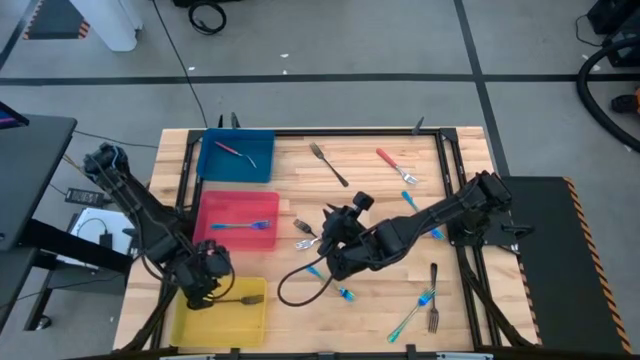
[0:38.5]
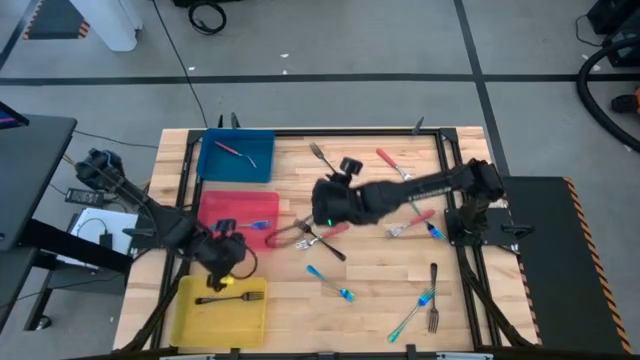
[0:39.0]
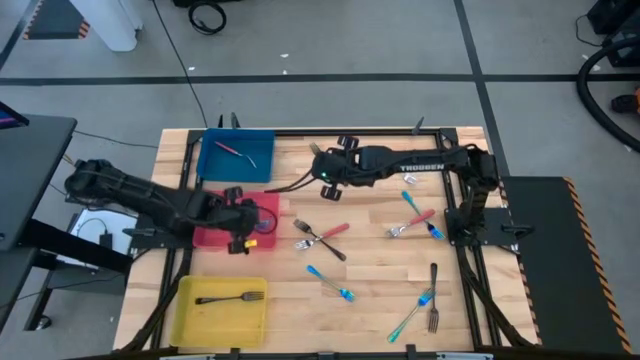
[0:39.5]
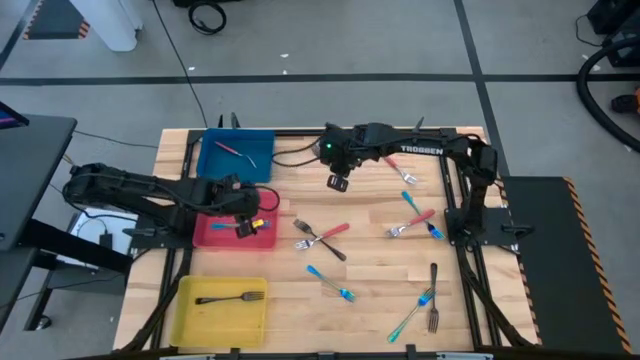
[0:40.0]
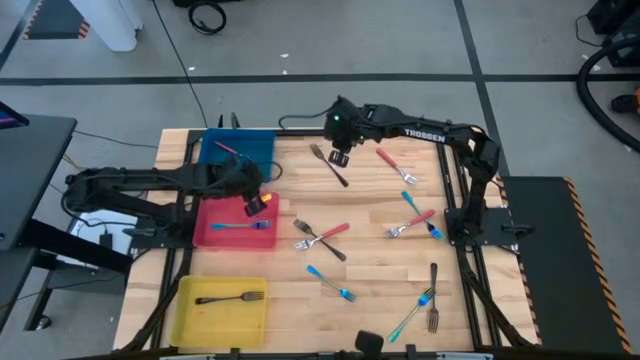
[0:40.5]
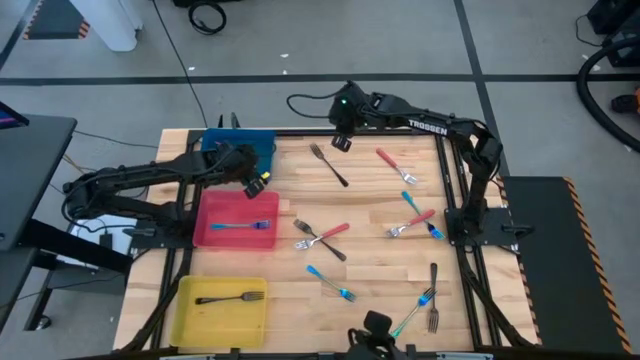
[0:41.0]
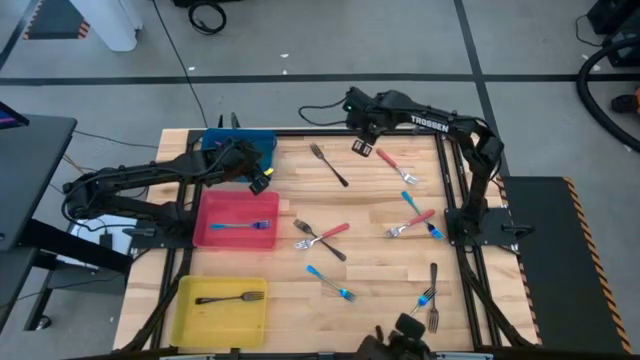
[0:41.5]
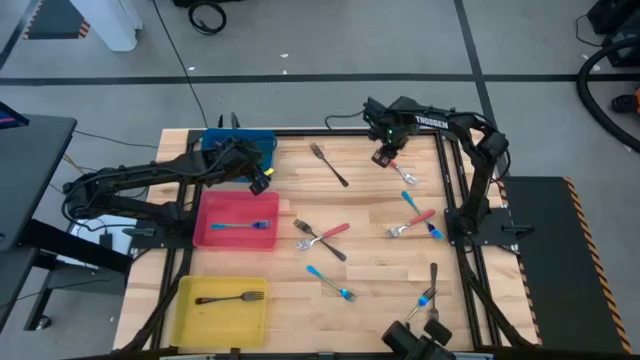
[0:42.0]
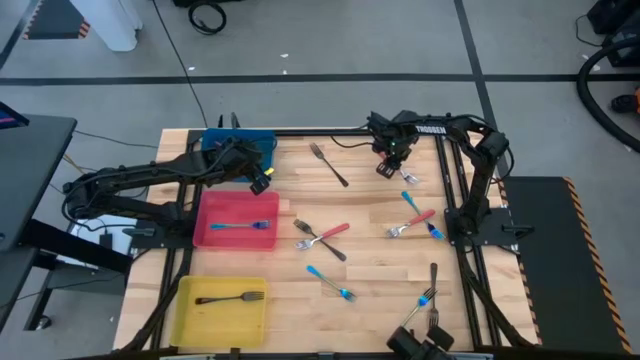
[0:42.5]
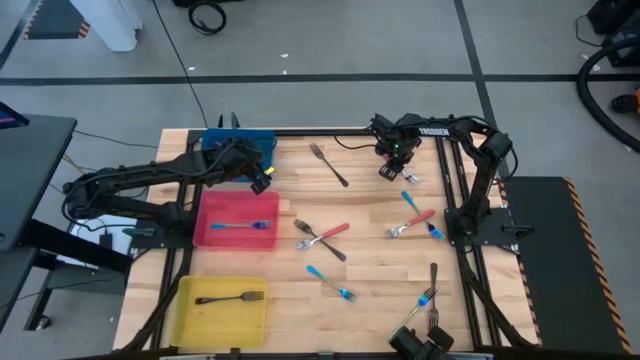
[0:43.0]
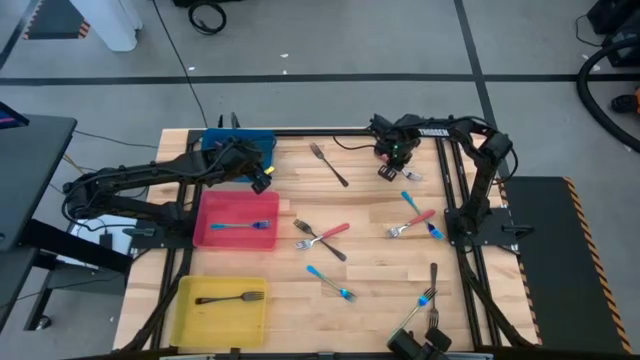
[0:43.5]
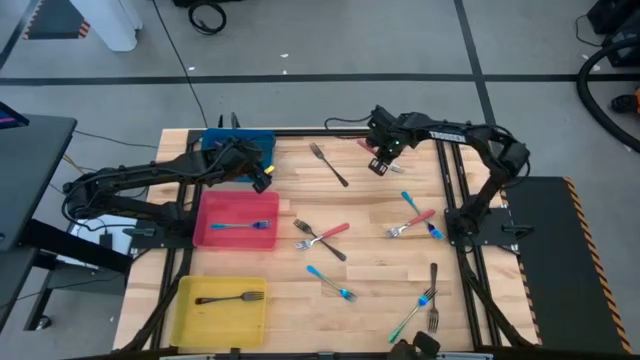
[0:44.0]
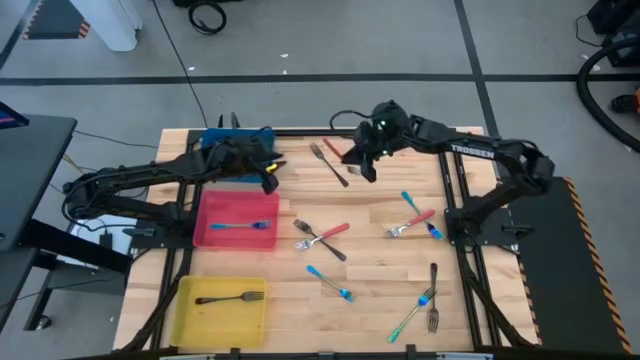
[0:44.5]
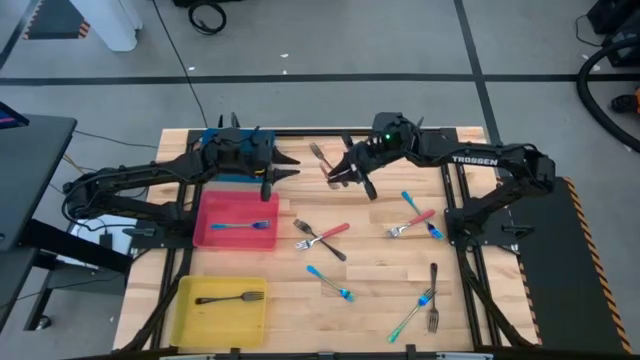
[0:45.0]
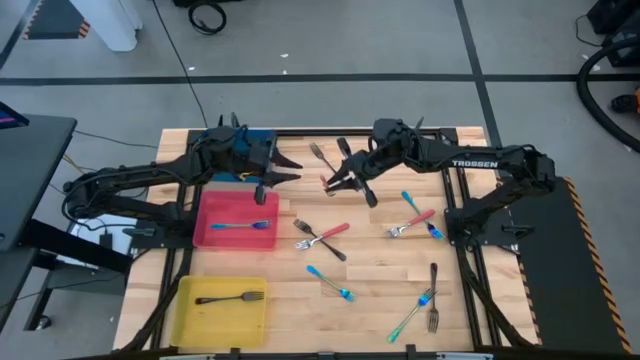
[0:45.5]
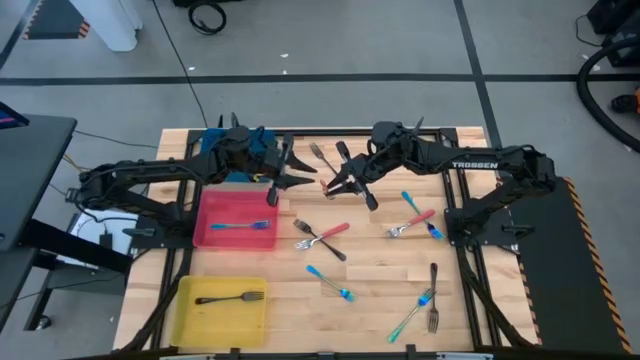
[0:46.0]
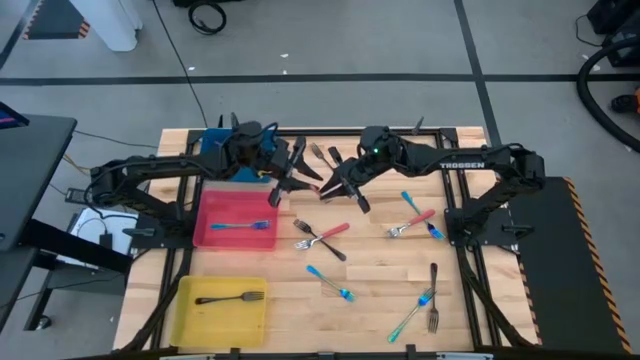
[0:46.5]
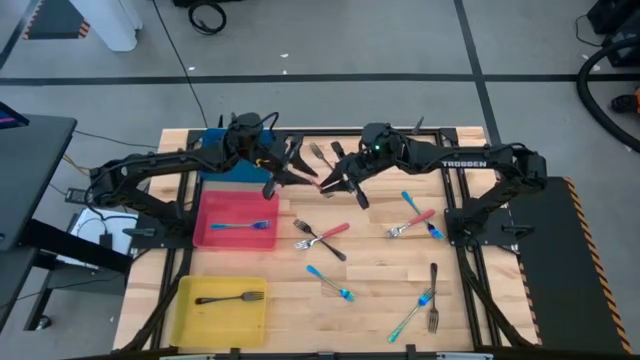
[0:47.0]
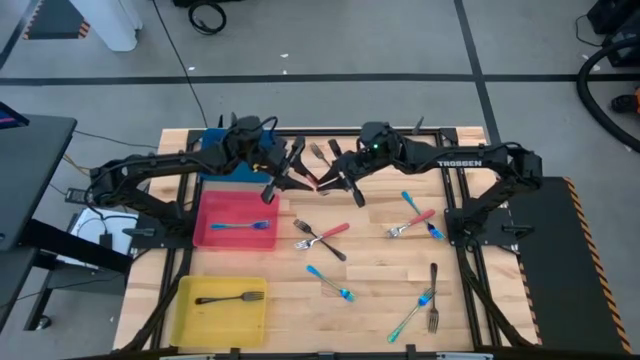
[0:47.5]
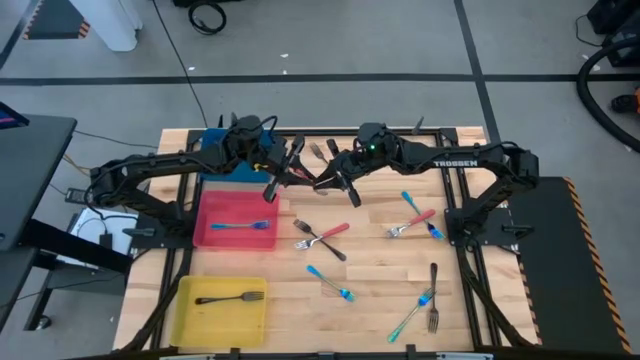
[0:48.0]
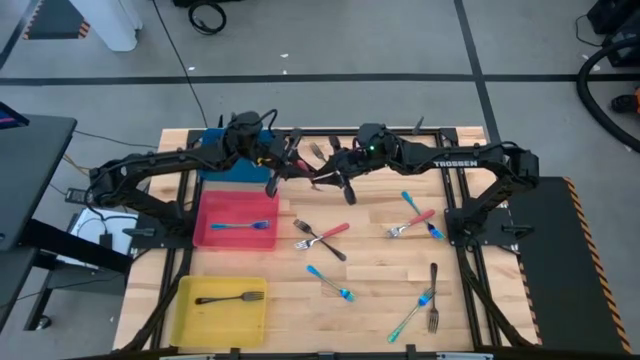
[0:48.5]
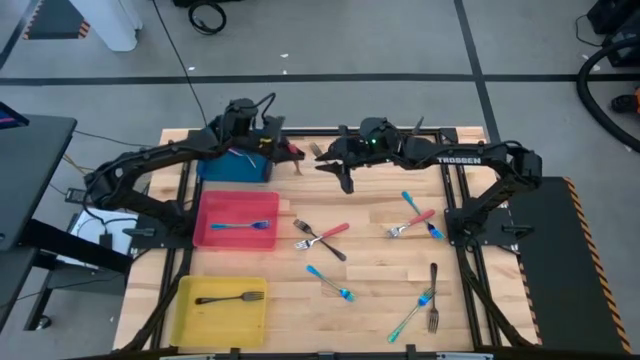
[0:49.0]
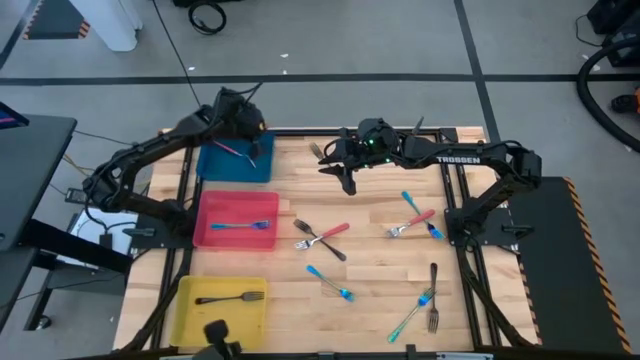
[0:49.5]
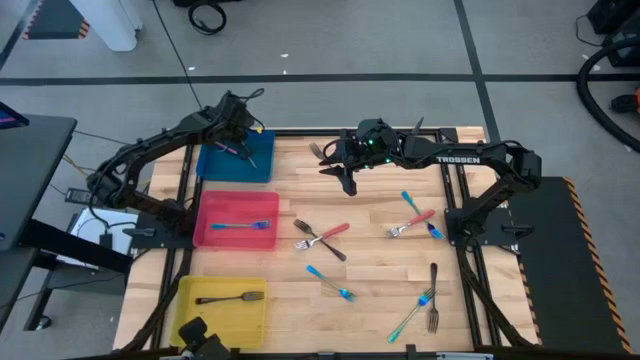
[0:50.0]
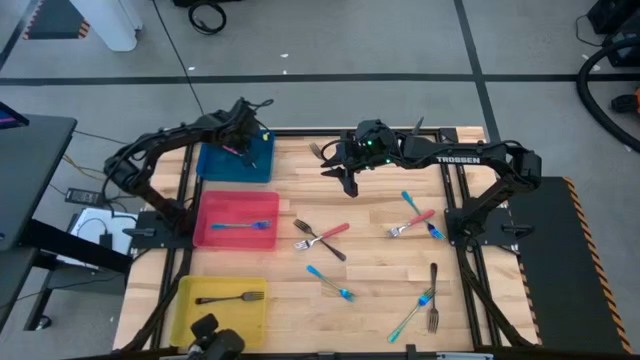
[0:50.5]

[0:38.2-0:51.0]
Task: Sort silverware by color (type)
Put the top pink fork into the blue bin

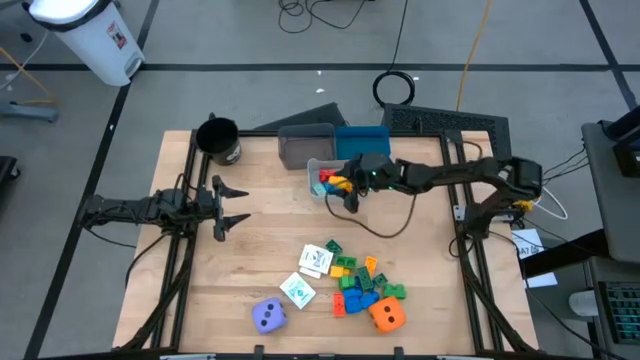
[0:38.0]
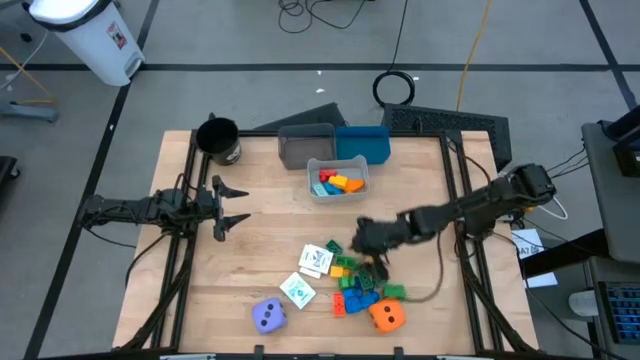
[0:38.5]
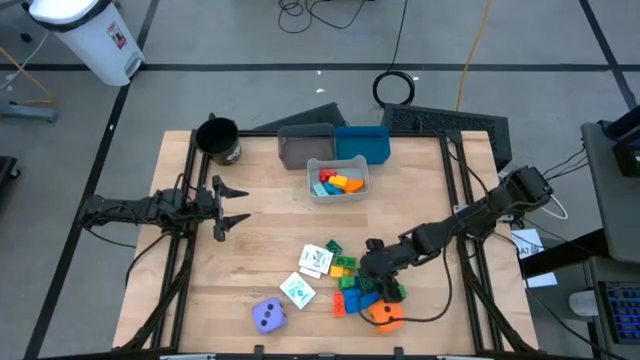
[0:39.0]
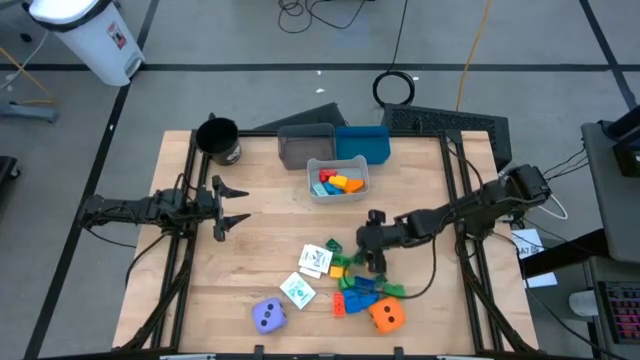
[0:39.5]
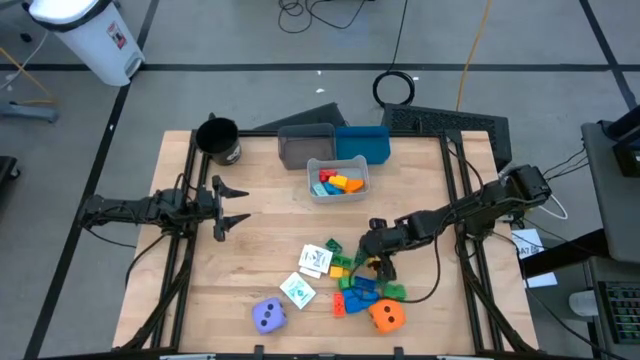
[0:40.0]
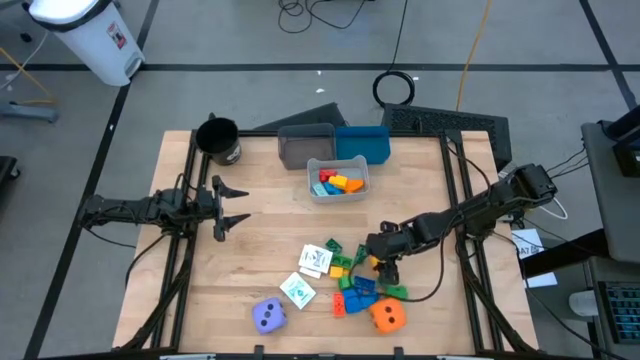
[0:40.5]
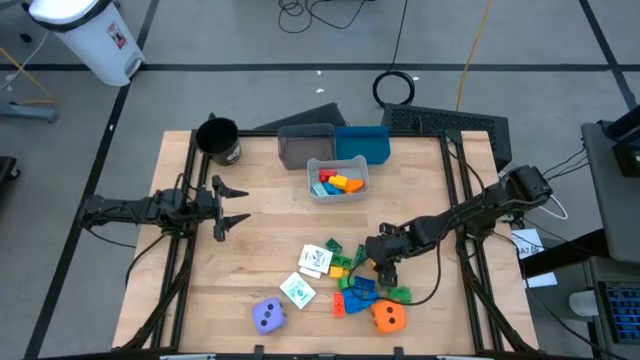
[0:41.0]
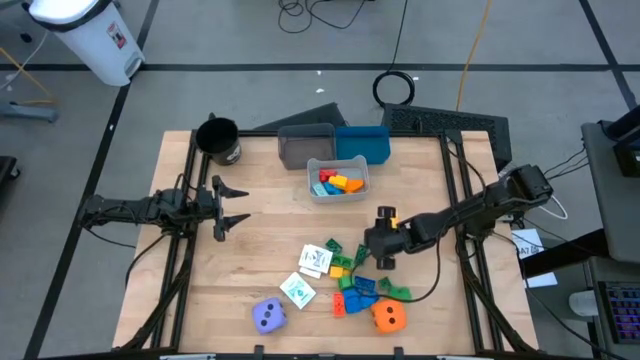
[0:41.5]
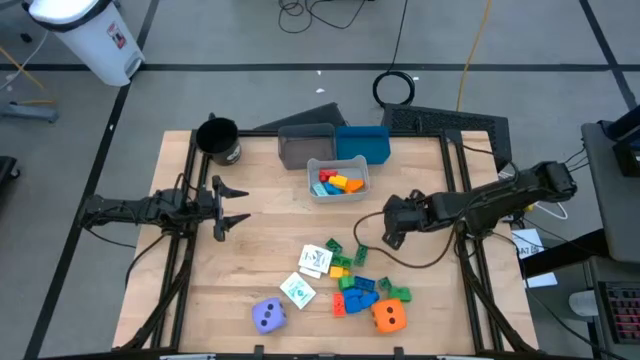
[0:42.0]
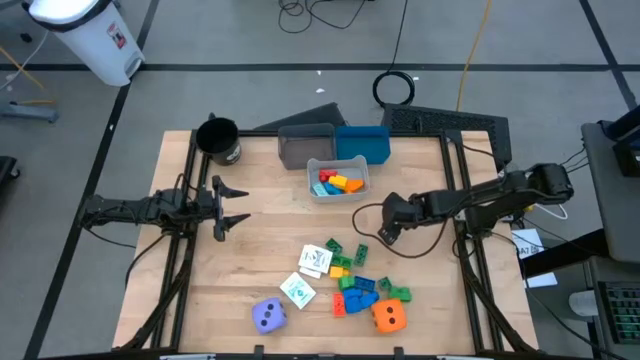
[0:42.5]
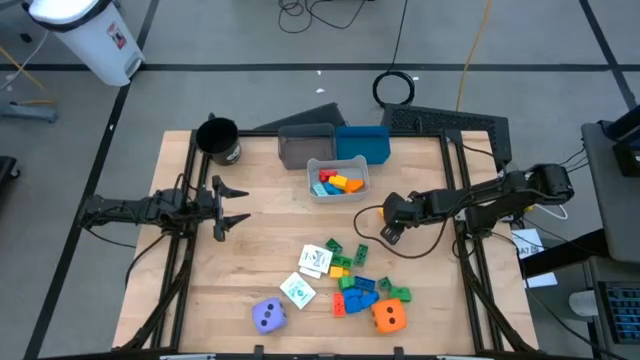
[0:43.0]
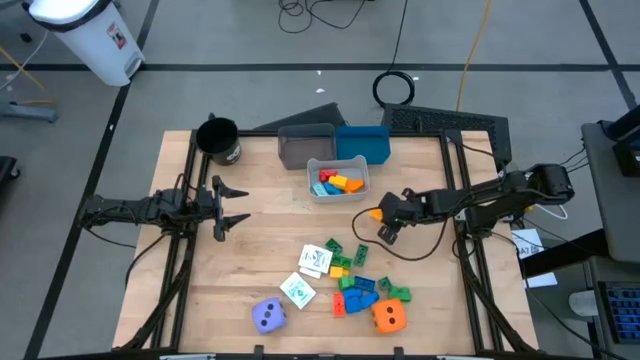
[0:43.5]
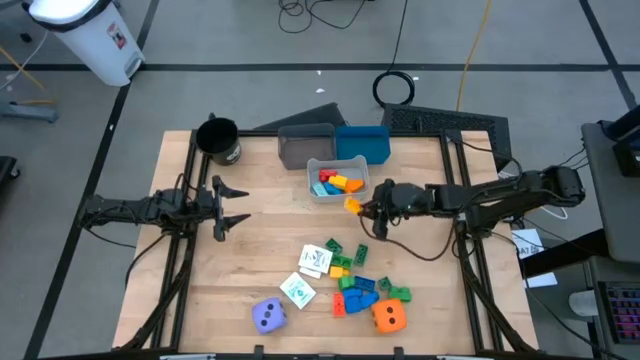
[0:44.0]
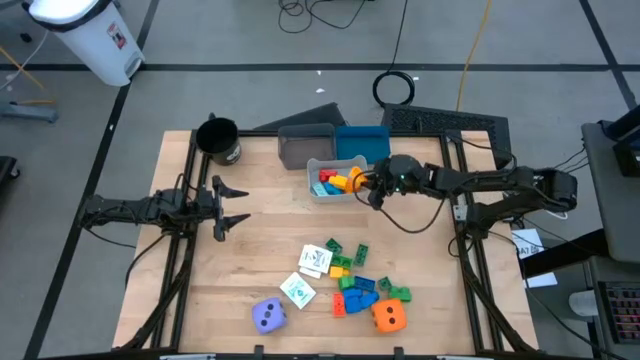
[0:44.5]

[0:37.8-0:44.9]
Task: Pick & Place Toys
Put the orange game piece into the gray bin

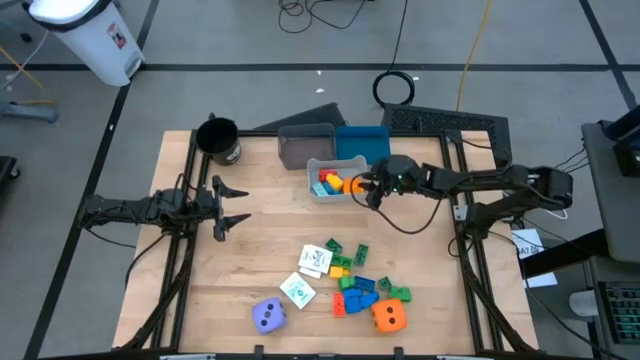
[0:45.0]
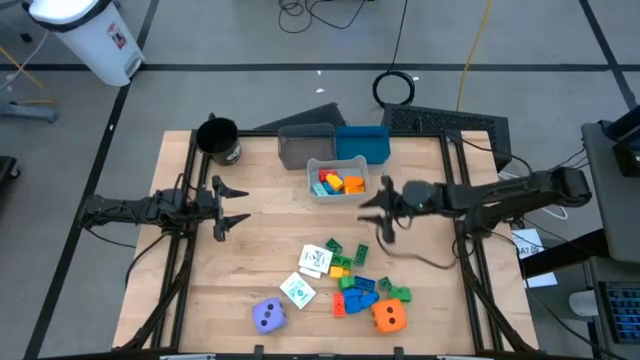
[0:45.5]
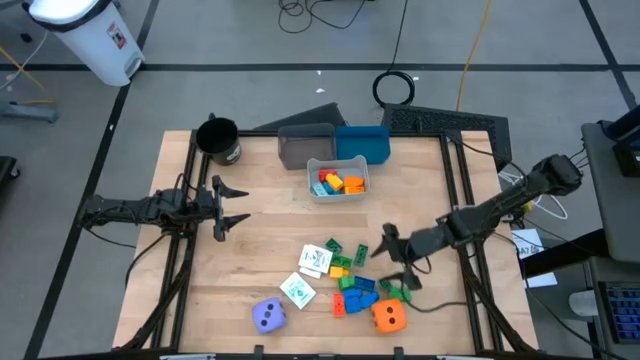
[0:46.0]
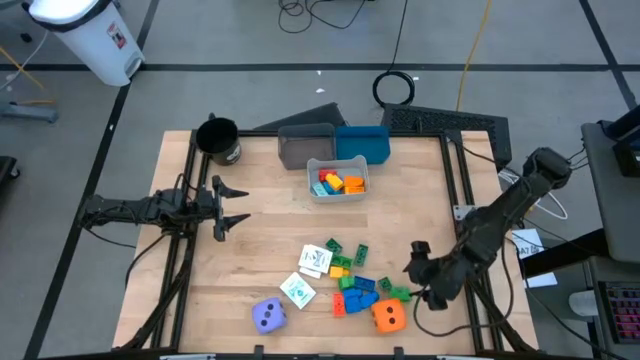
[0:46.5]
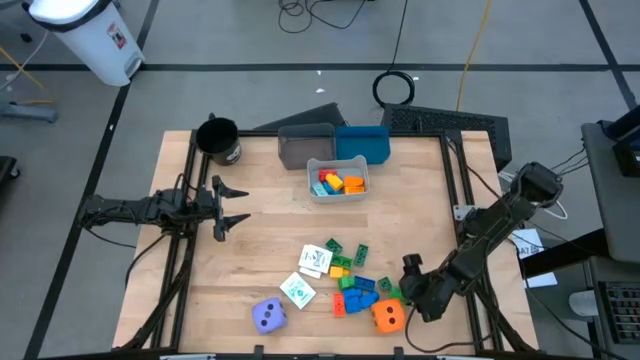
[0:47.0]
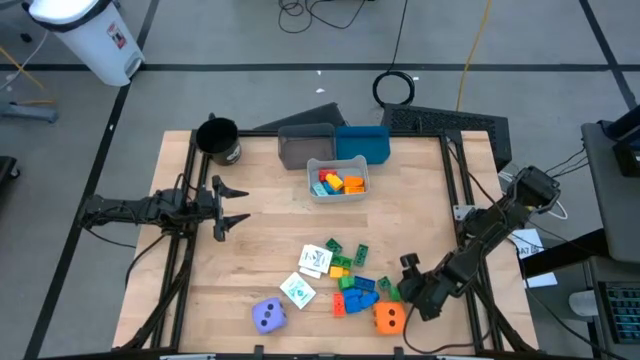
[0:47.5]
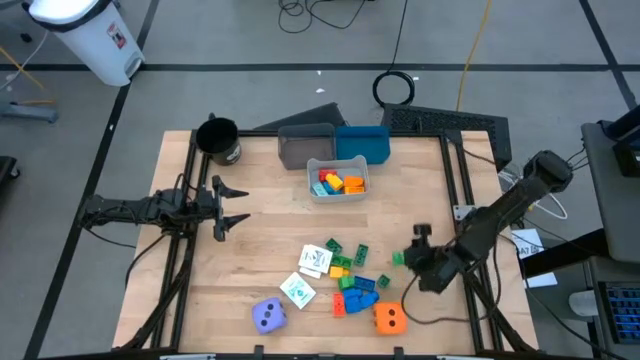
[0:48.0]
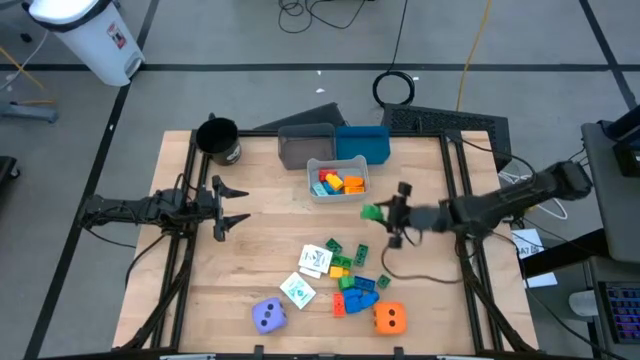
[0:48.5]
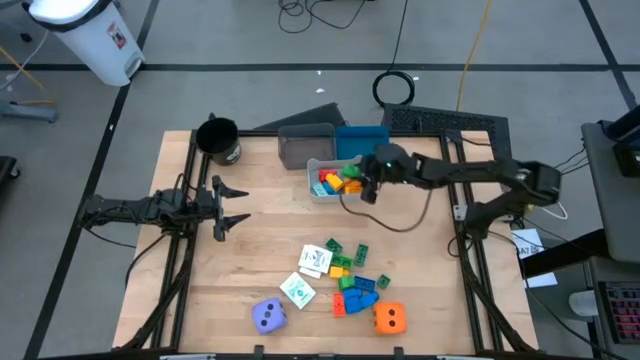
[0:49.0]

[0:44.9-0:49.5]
Put the green game piece into the gray bin
